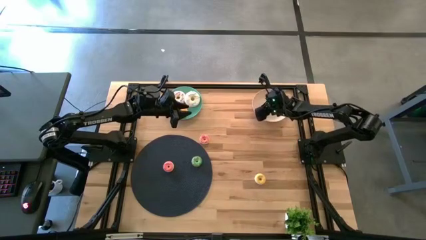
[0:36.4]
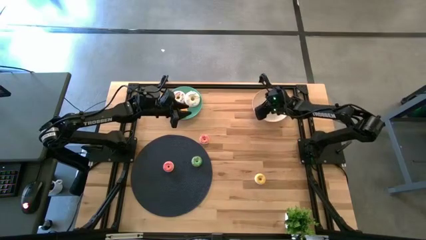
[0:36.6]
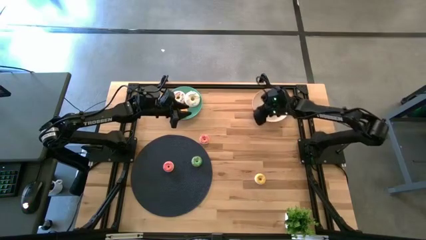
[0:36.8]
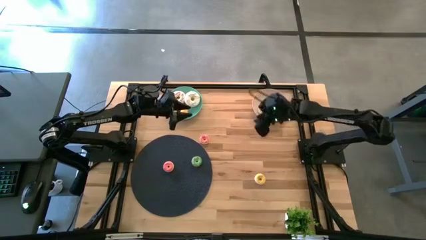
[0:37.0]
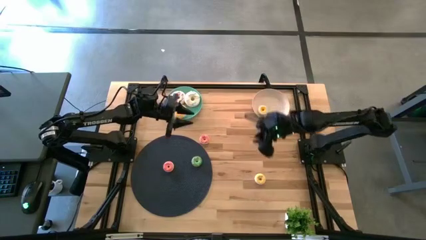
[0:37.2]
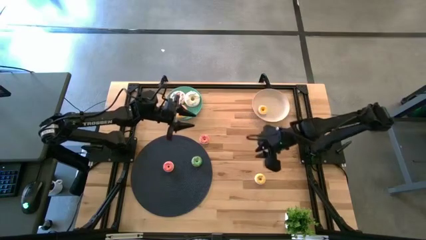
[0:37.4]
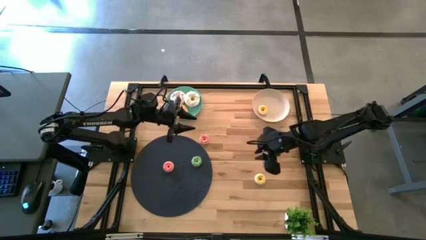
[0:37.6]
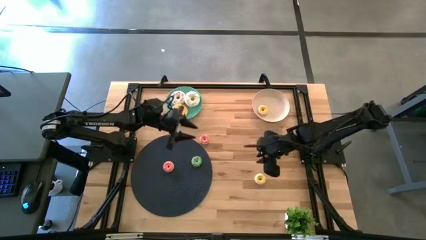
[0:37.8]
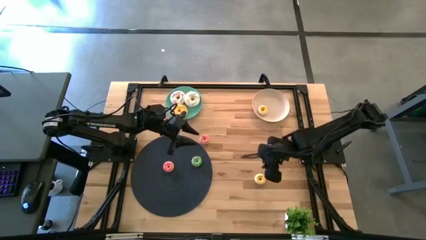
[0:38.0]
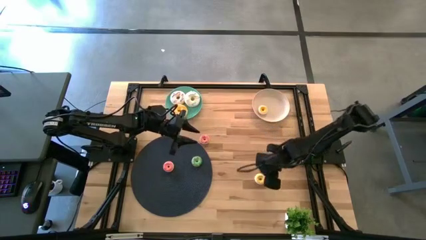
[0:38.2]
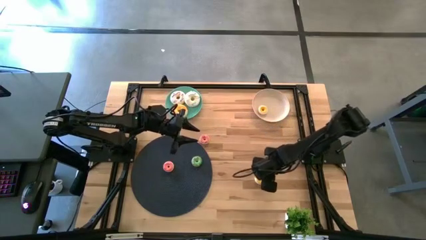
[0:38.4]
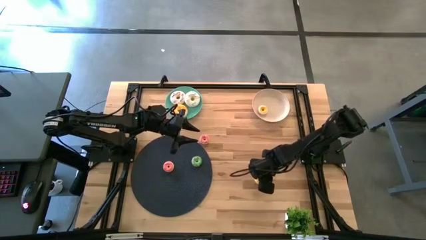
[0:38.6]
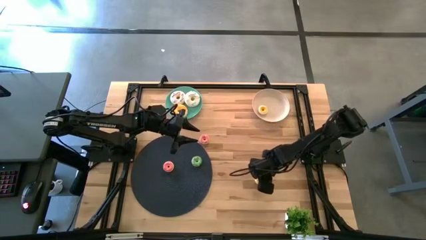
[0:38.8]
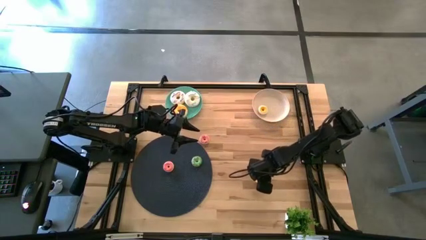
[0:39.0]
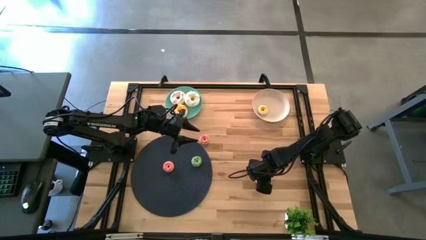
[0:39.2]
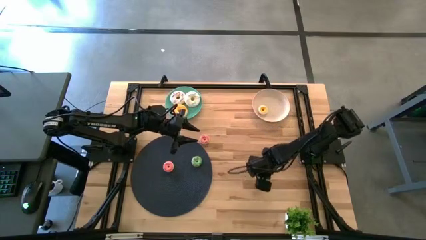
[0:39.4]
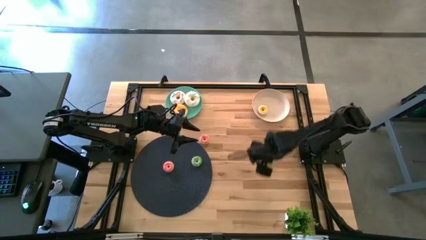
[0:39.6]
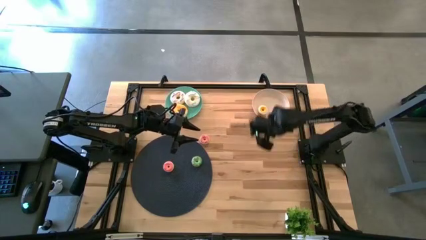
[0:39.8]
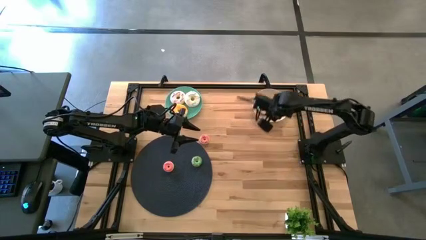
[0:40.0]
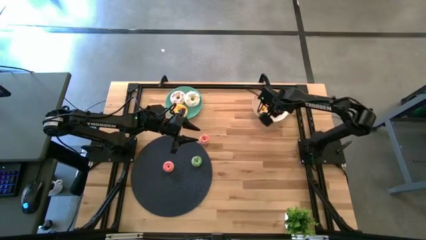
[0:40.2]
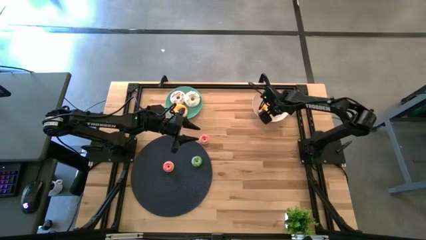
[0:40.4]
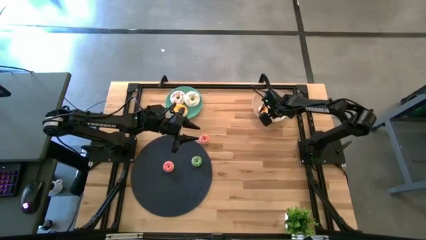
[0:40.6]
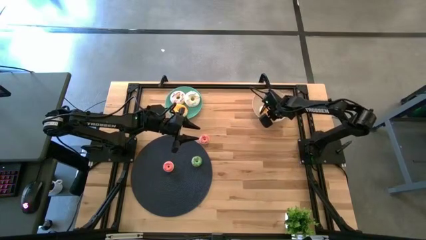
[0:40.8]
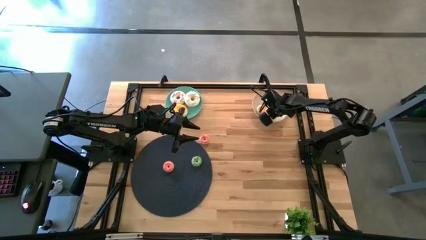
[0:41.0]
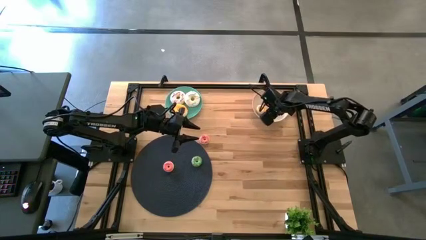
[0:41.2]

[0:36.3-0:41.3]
Task: Pick & Place donuts
Put the small yellow donut on the white plate

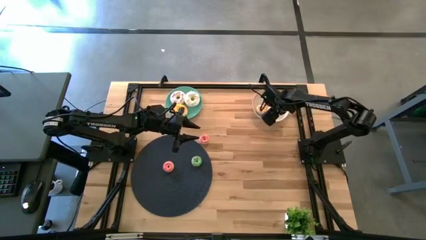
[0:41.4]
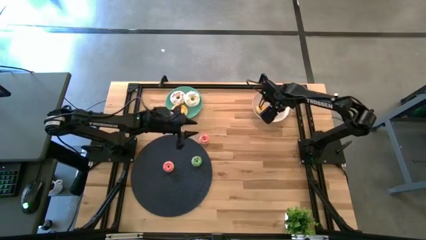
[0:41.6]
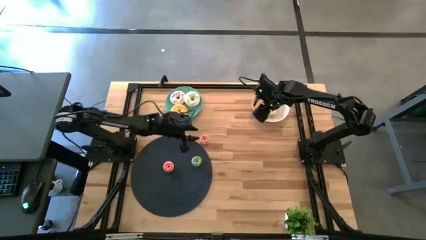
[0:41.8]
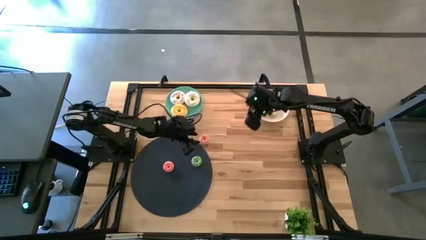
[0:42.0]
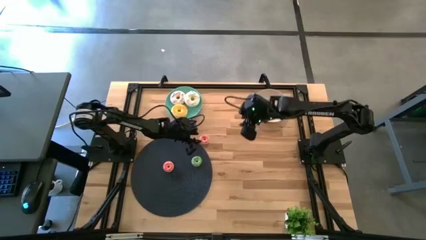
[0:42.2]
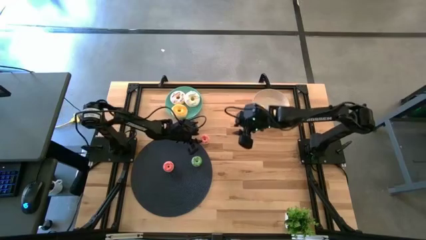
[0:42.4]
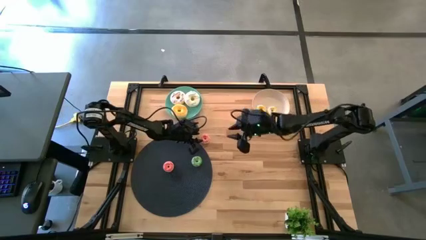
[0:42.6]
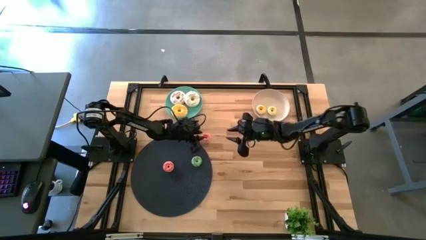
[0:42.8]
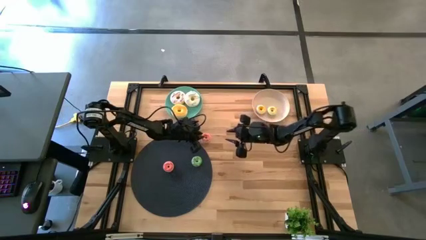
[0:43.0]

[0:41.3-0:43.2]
Put the top small pink donut on the white plate

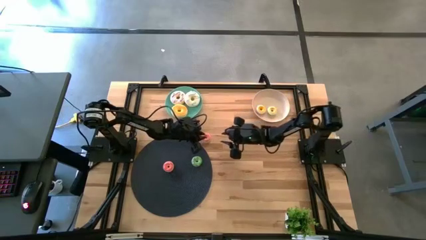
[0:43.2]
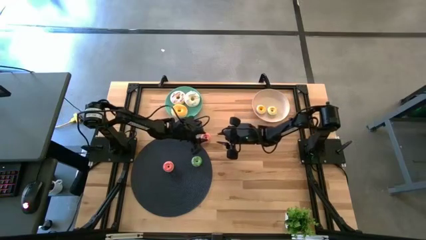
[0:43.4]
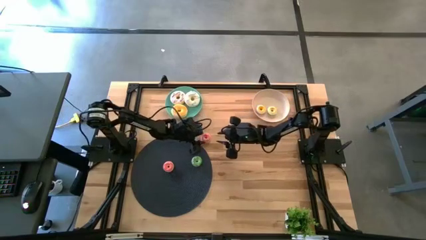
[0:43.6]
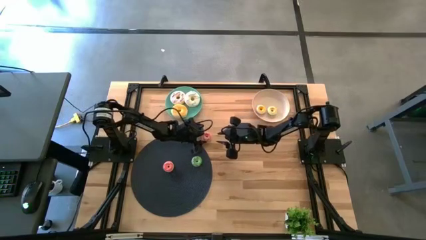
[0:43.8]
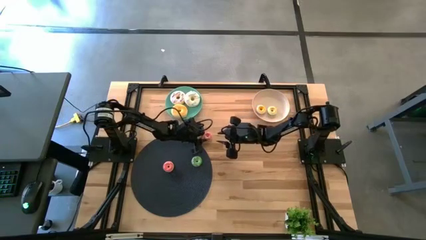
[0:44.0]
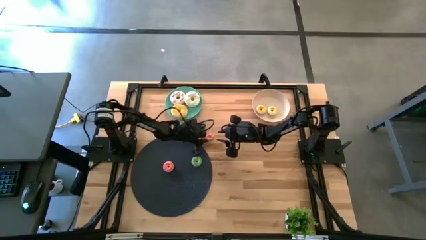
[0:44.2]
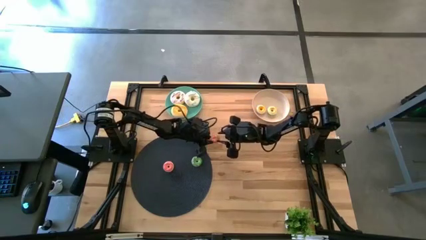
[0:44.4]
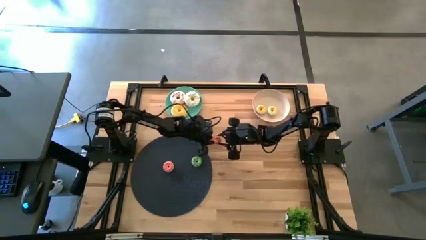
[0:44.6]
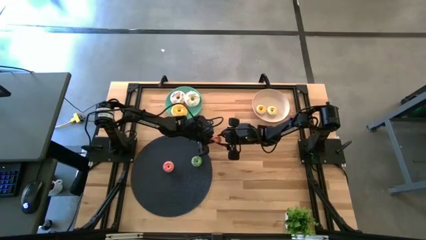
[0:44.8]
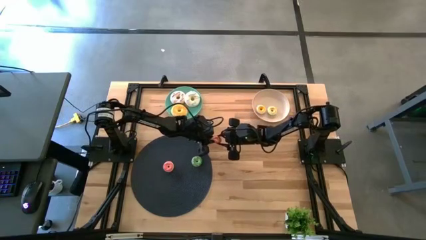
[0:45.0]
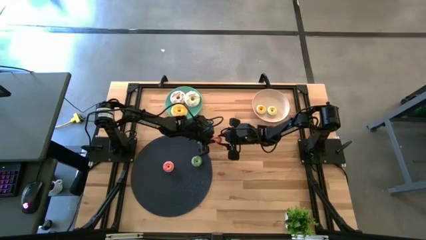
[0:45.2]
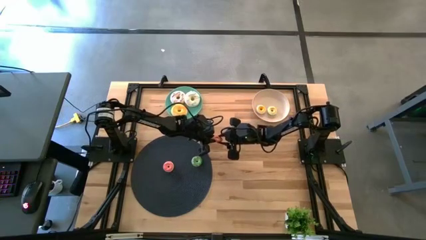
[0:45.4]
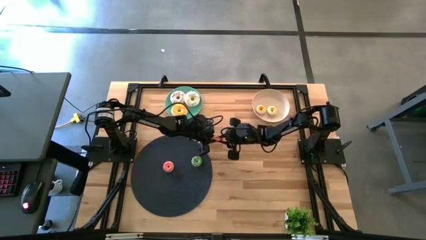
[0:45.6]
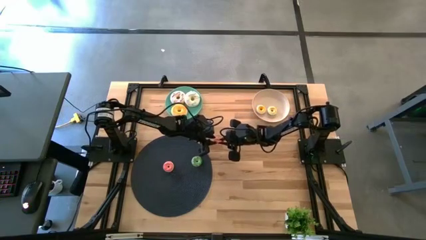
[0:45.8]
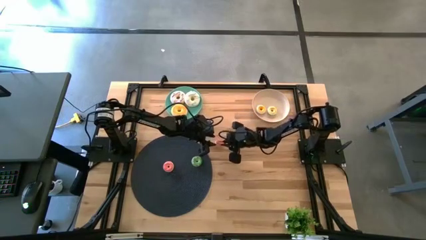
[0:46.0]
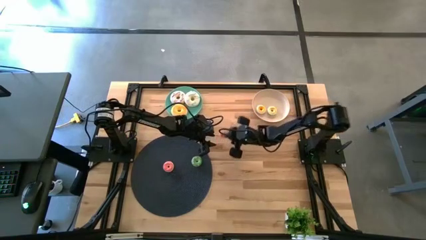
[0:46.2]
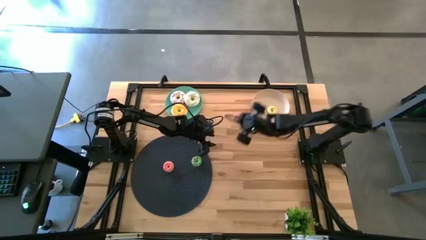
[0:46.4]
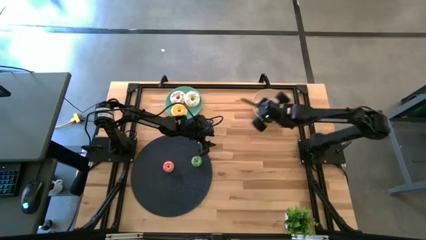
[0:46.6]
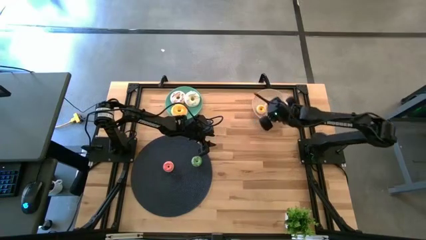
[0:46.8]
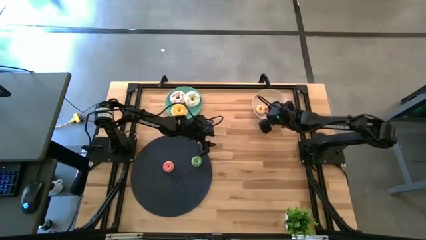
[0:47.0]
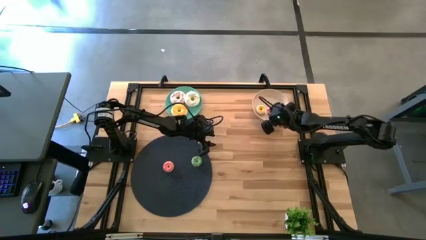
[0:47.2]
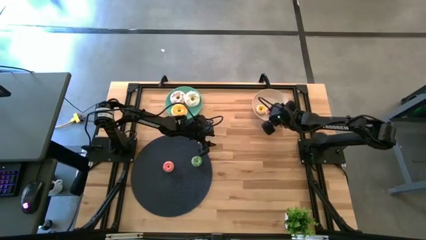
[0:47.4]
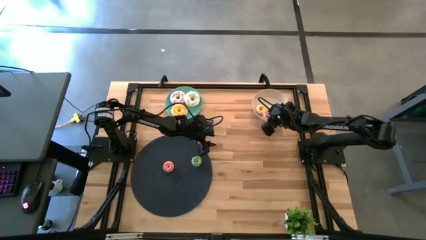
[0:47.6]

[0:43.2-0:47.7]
Put the top small pink donut on the white plate

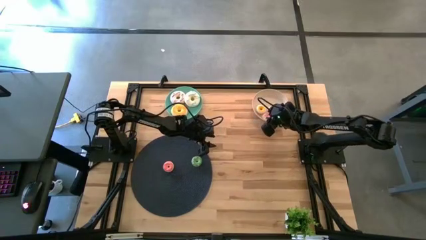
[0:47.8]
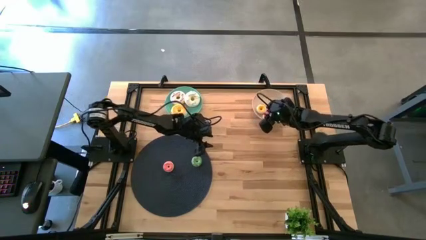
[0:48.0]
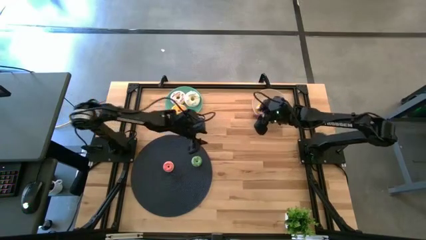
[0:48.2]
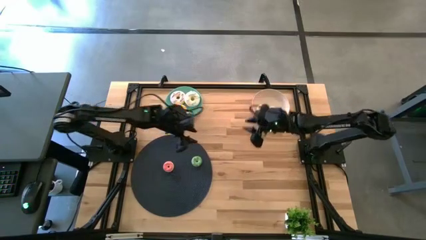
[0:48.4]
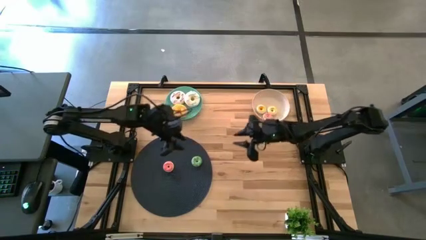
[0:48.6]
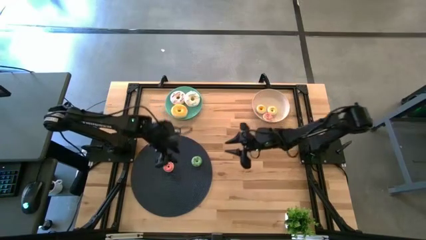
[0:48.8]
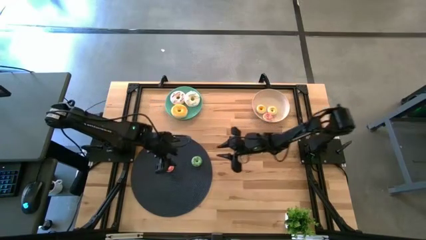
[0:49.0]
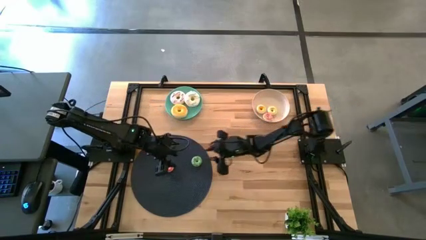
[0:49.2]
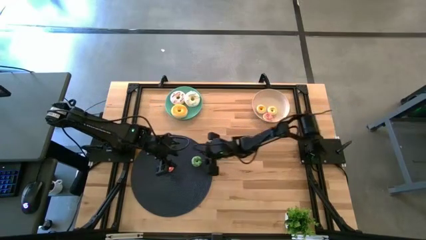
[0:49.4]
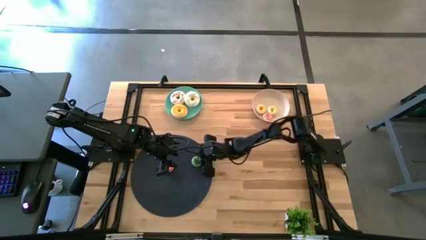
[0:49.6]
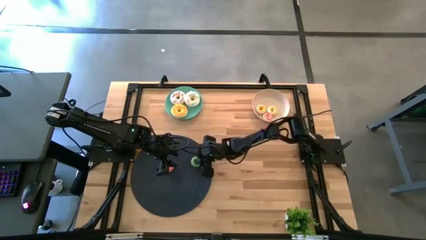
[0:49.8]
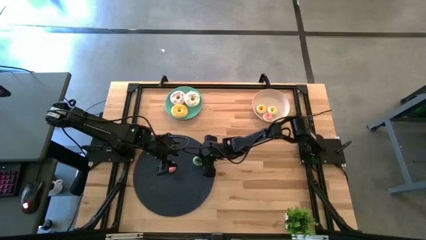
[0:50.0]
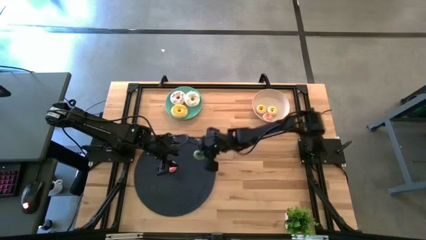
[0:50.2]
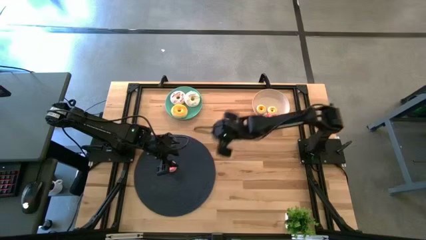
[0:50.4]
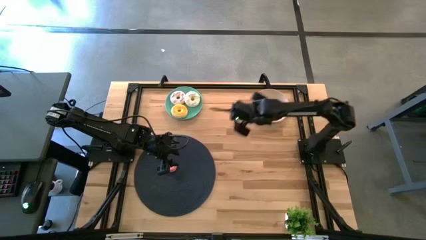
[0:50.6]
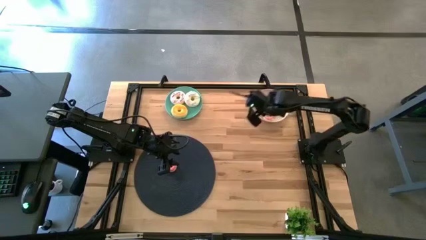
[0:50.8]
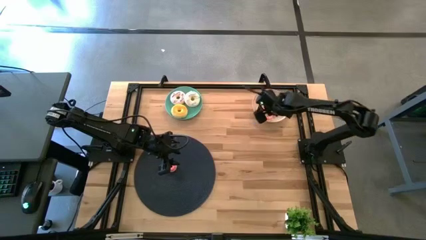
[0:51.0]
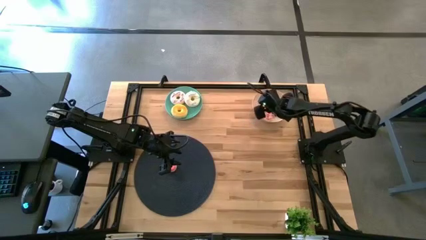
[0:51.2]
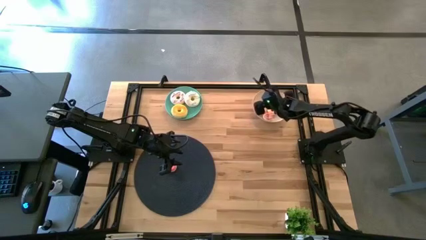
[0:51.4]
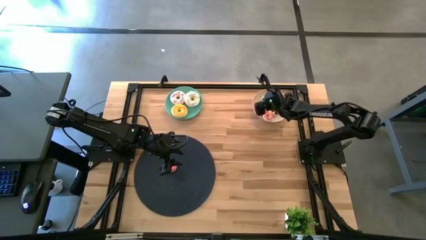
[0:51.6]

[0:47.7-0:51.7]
Put the small green donut on the white plate
